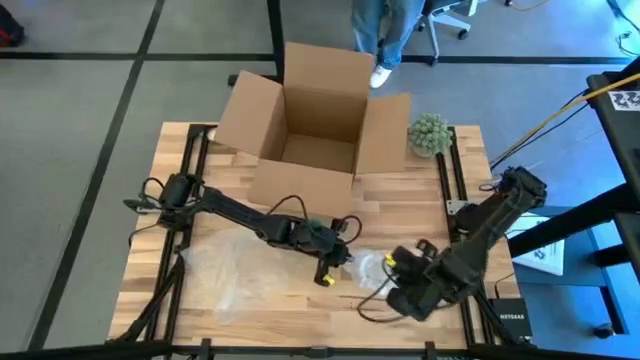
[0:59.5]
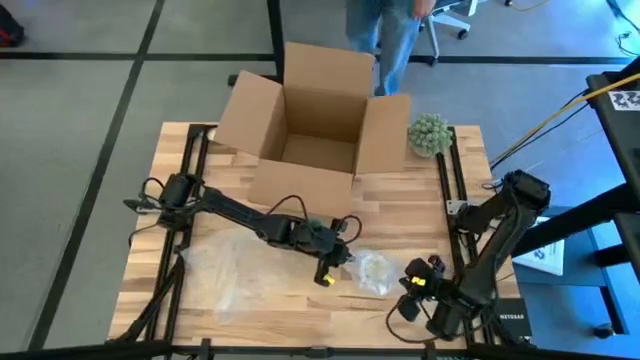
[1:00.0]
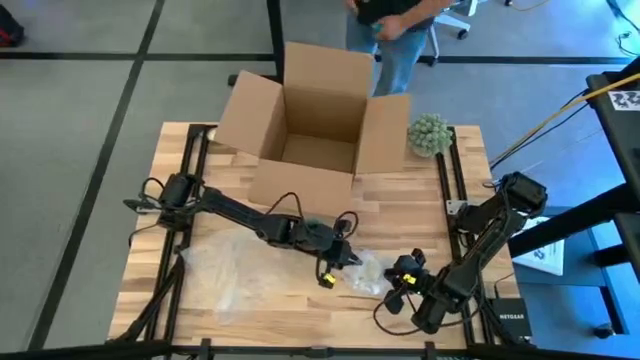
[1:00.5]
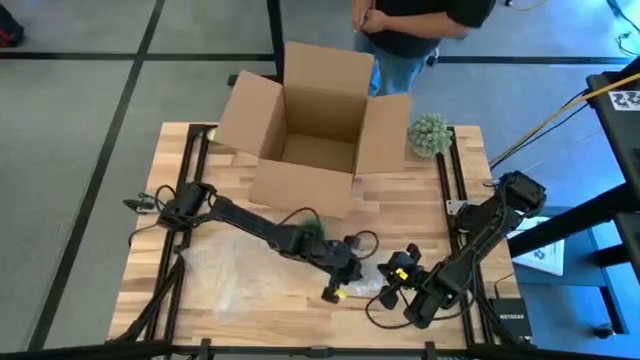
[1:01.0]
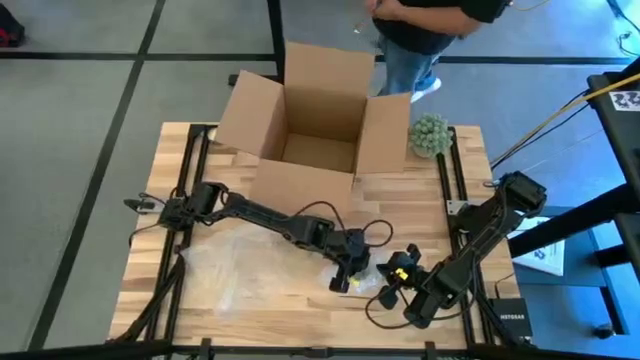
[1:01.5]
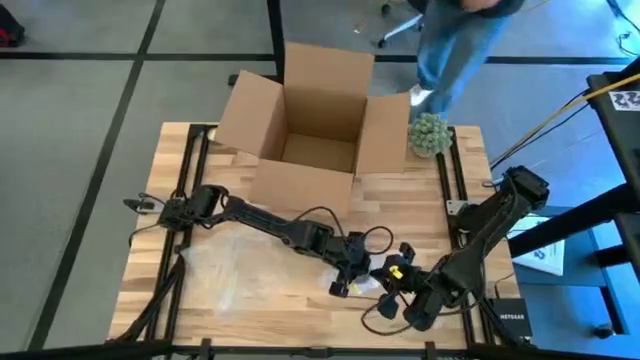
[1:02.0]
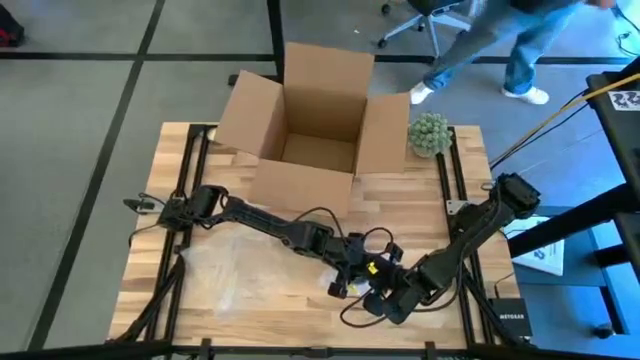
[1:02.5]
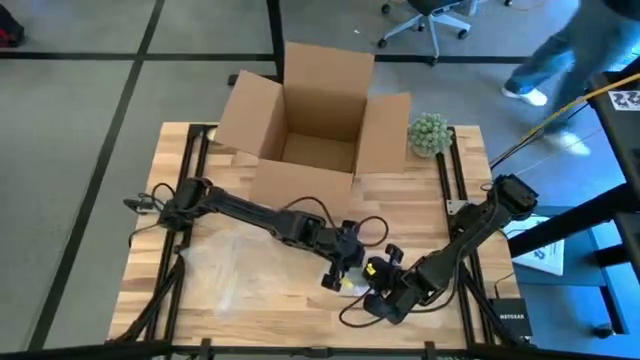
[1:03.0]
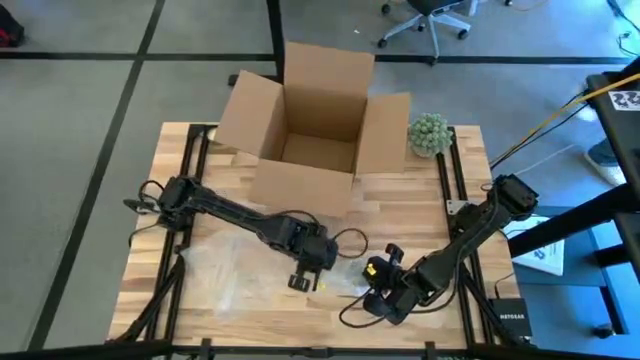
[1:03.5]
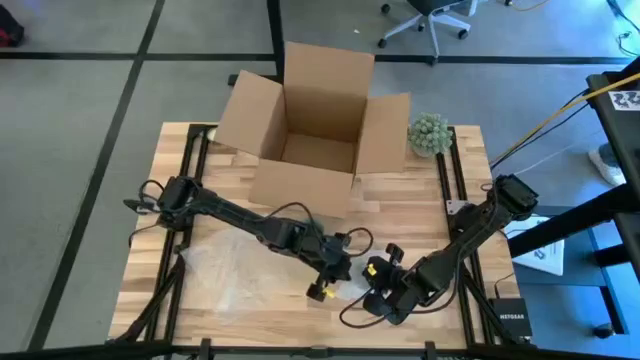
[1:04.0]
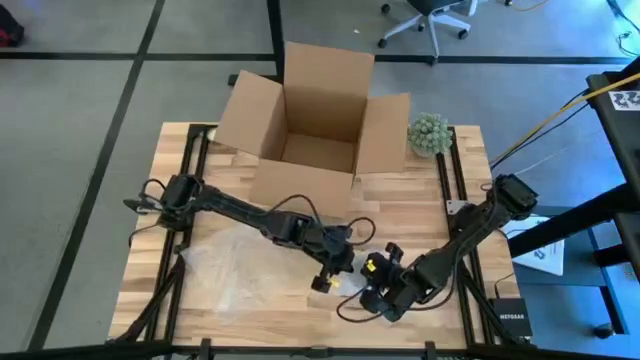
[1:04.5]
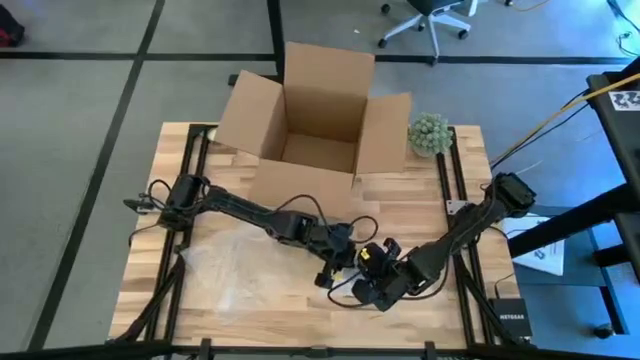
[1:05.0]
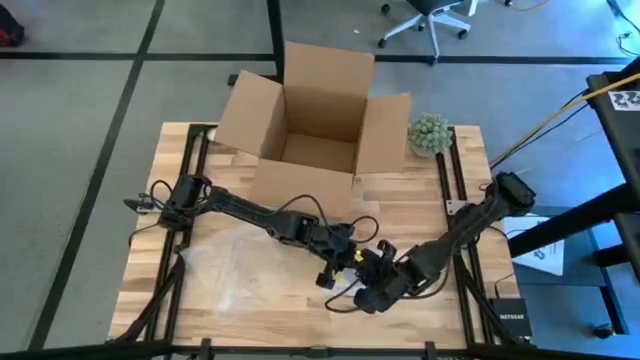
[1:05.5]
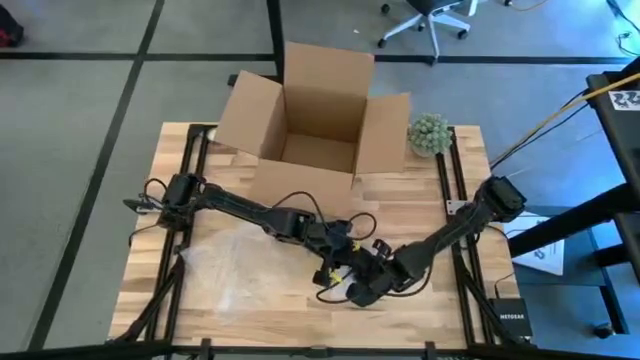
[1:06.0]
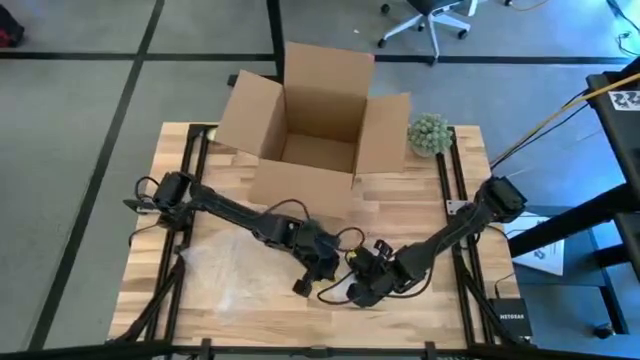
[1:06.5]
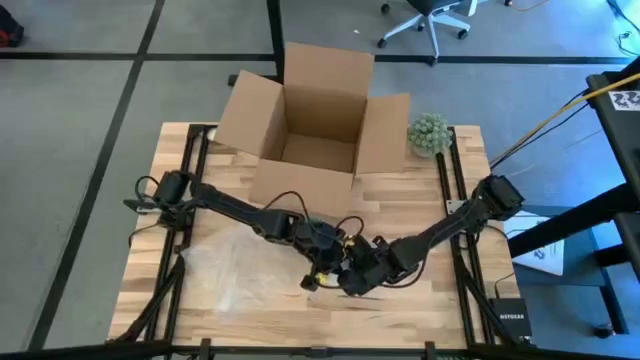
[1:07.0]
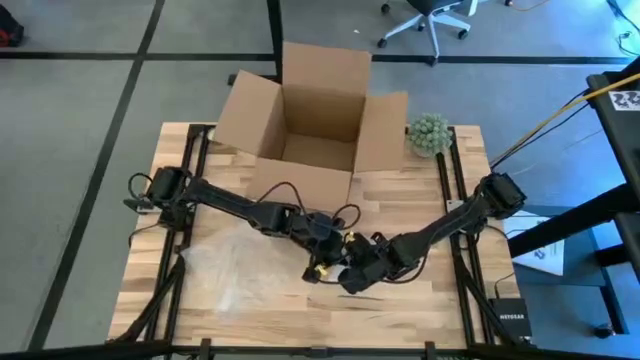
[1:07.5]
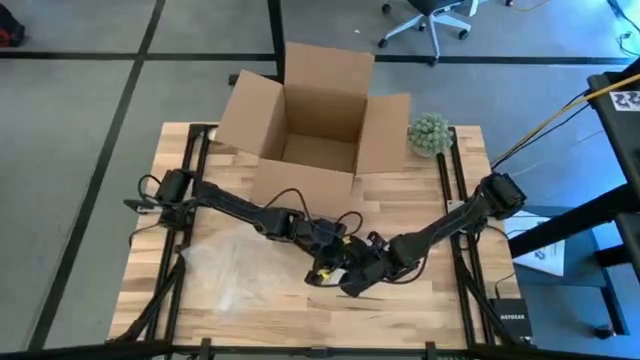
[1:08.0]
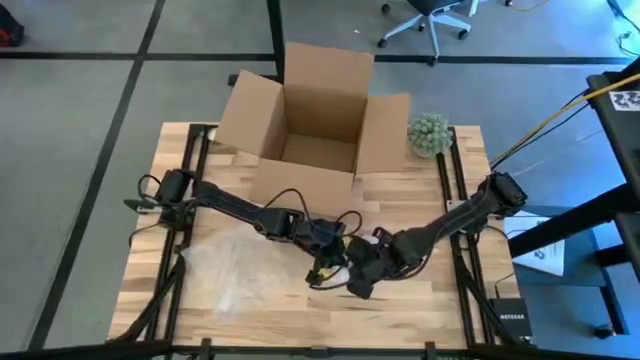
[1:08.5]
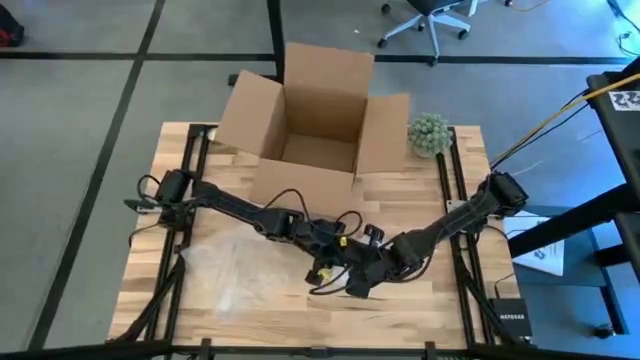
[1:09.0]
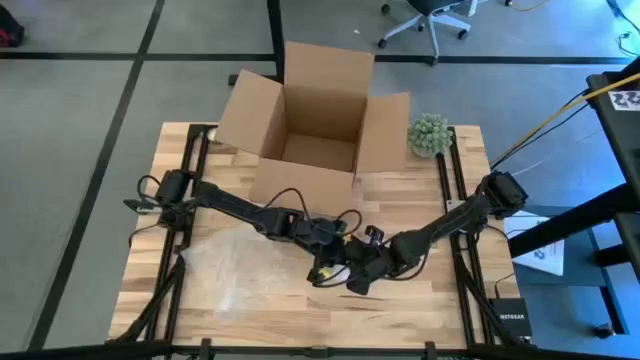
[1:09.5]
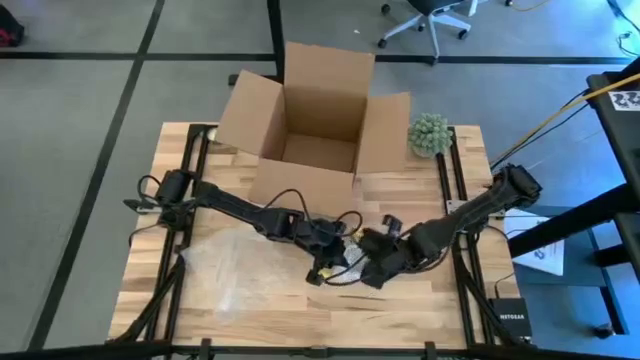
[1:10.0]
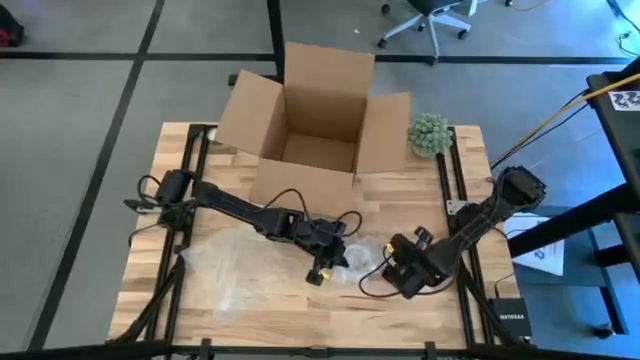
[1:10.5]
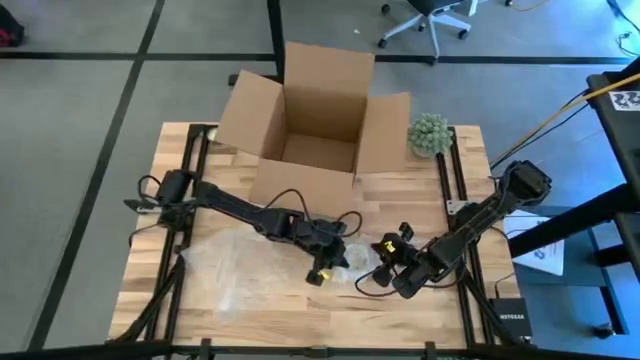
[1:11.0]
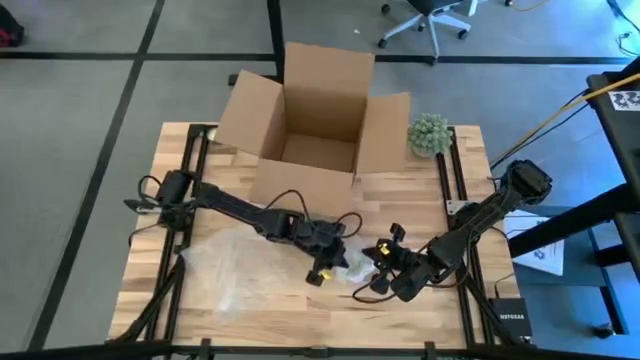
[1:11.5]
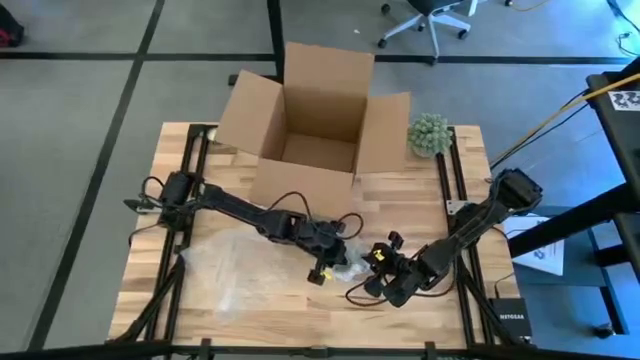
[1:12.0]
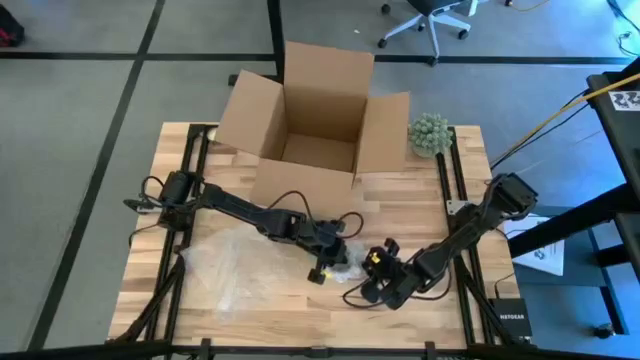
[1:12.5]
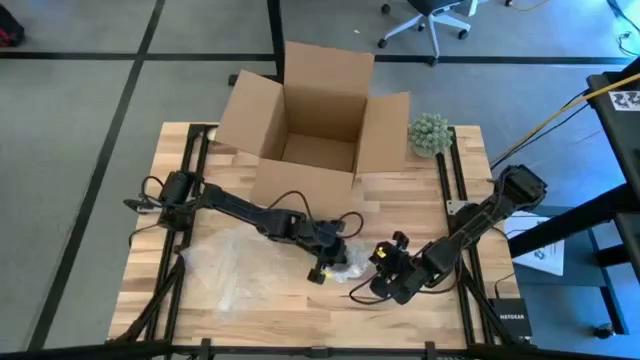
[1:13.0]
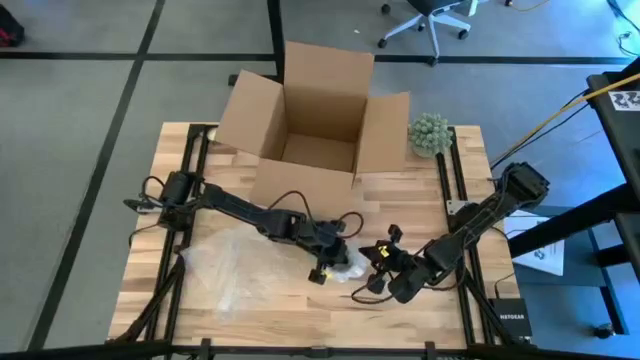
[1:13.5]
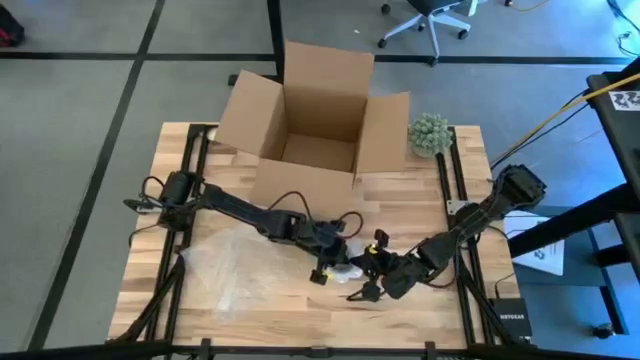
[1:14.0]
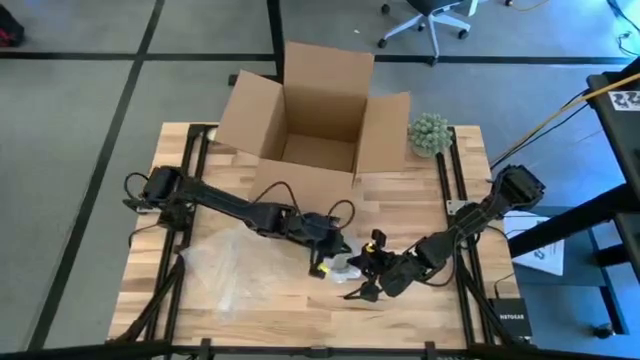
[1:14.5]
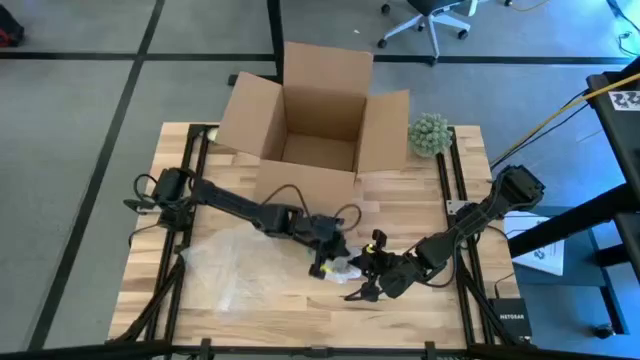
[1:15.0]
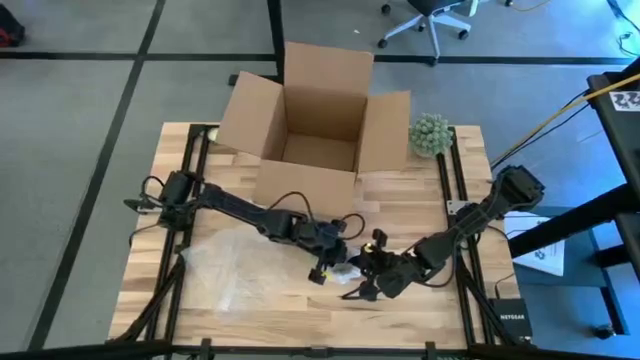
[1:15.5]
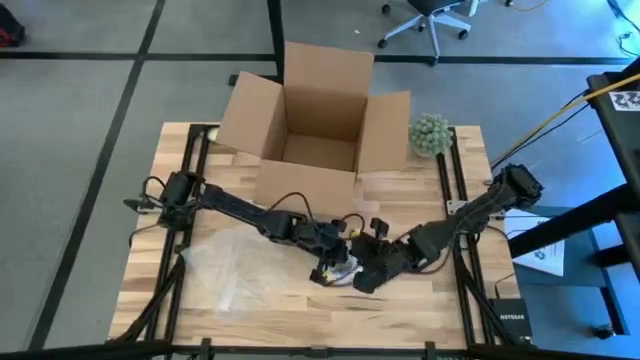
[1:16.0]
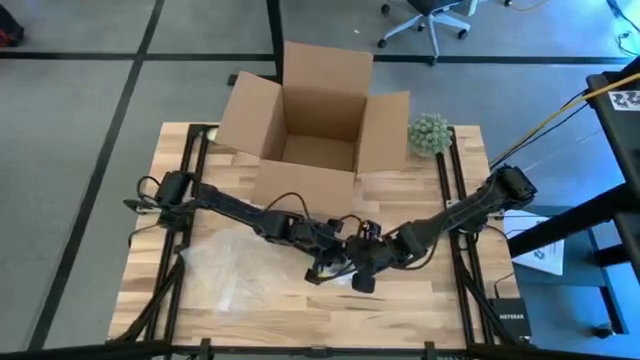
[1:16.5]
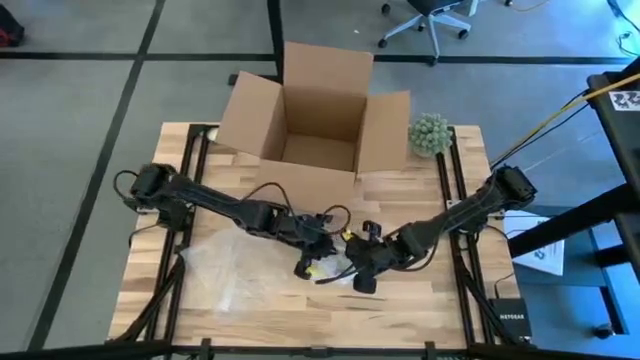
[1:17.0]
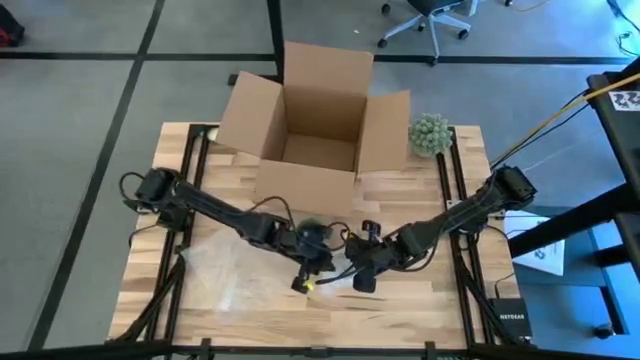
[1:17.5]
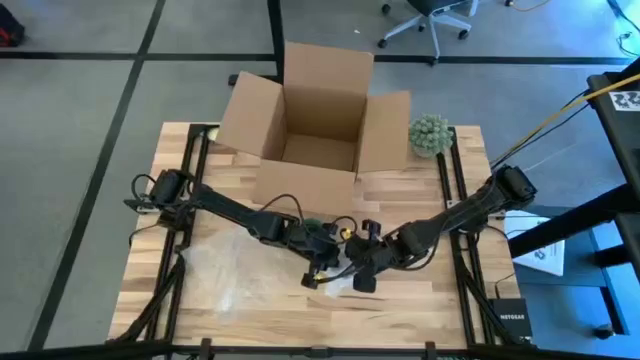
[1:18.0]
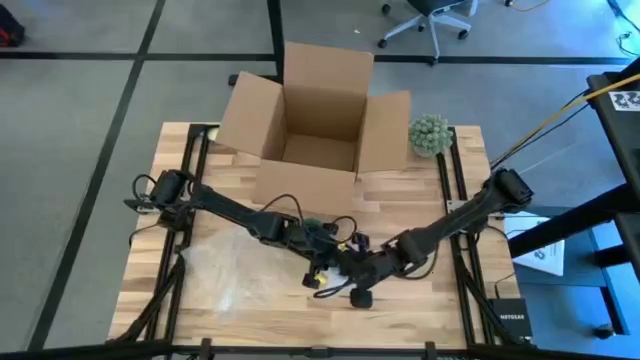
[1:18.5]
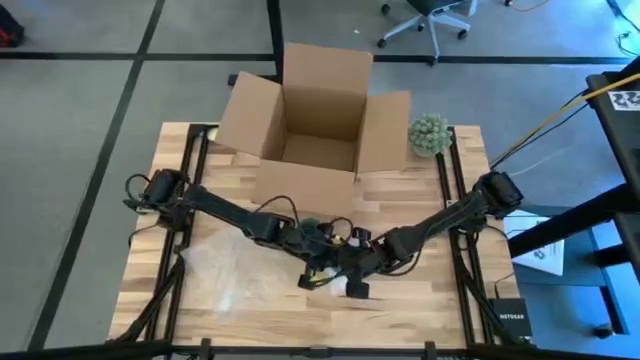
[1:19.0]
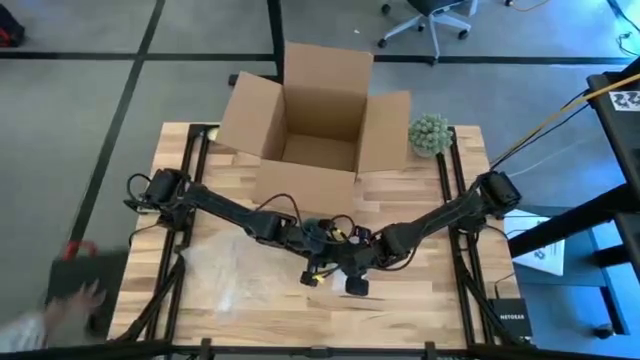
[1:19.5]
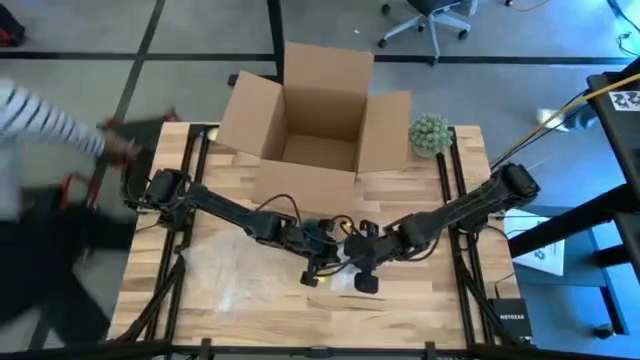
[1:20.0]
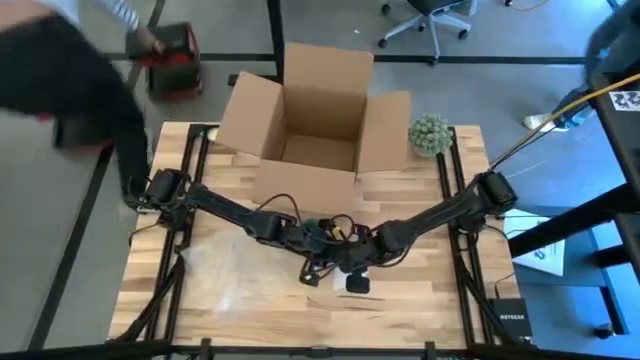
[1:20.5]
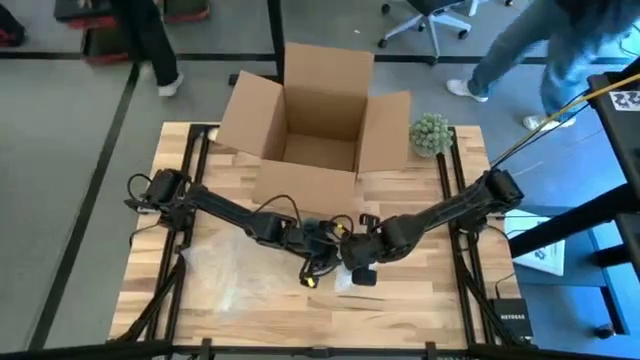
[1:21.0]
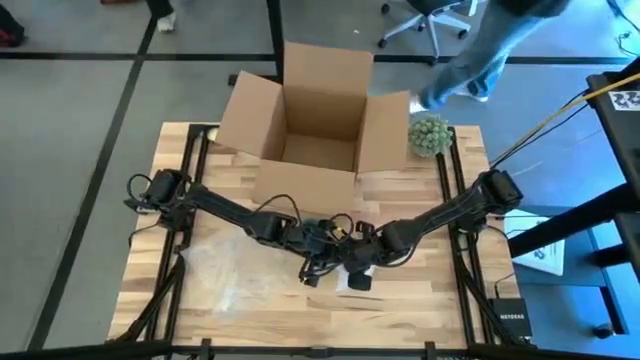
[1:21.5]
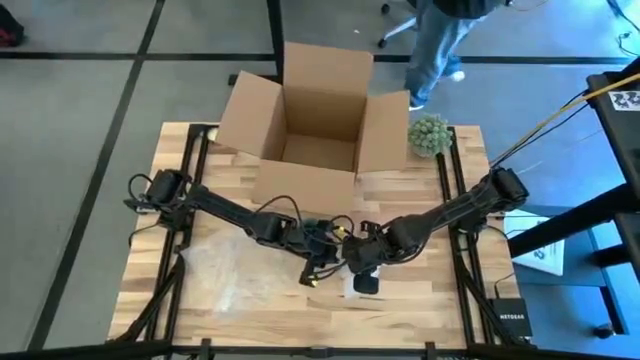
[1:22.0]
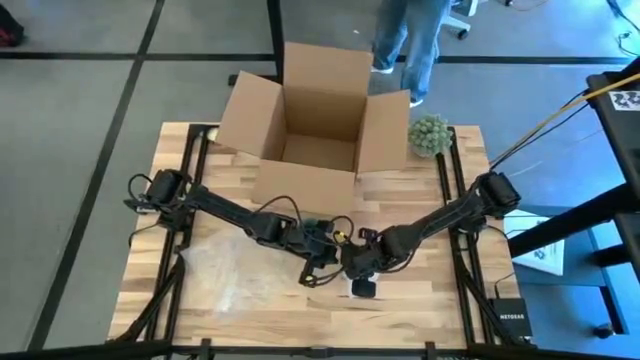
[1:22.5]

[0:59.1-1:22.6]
Task: wrap mug
Wrap the bottom white blue floral mug glass
